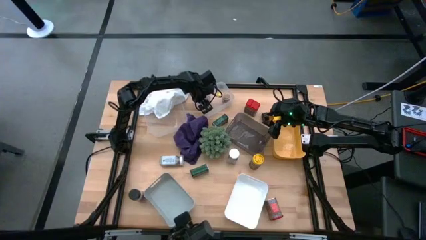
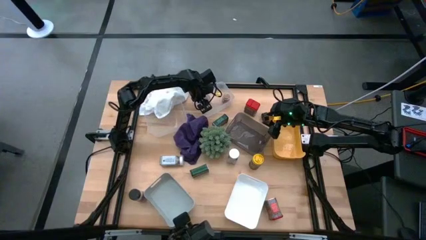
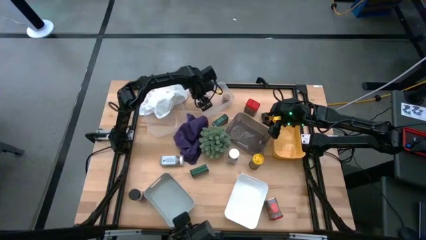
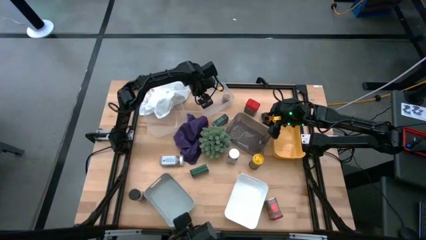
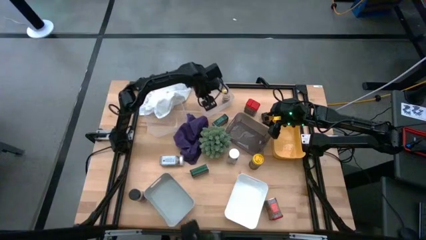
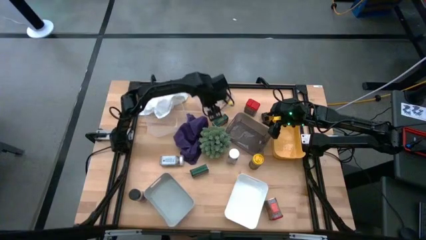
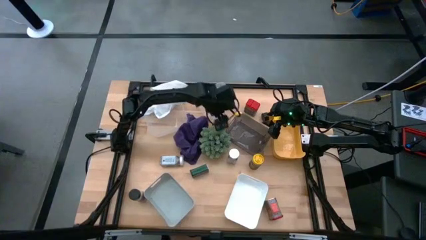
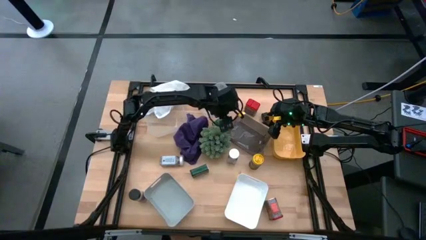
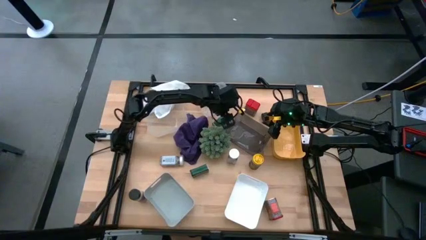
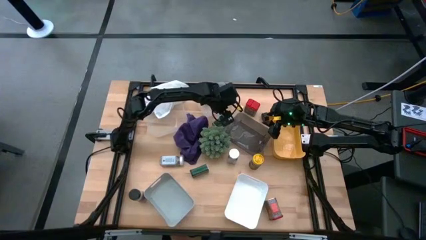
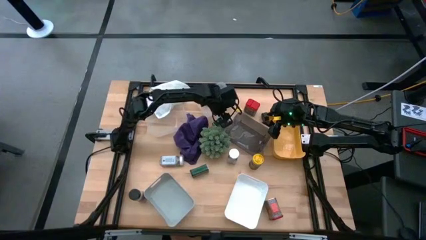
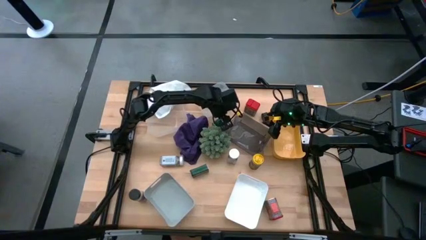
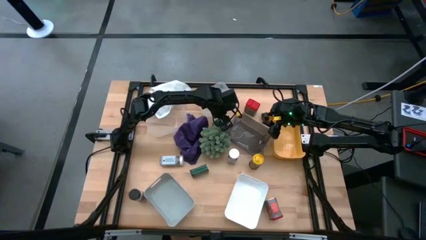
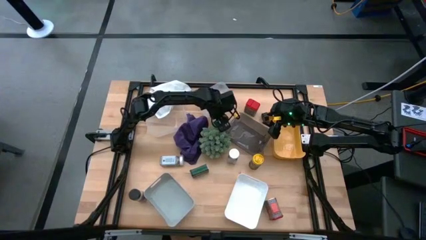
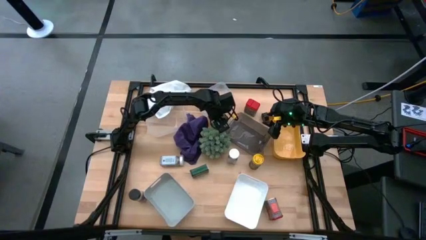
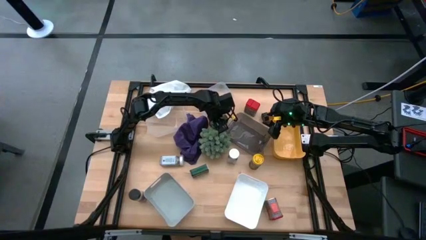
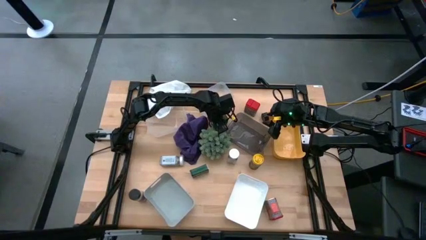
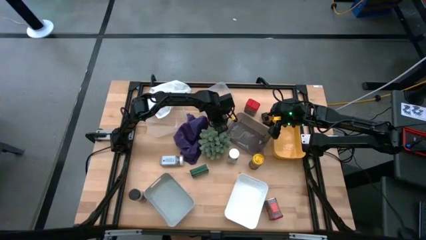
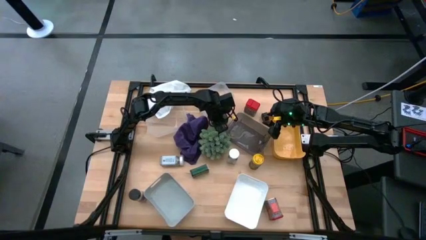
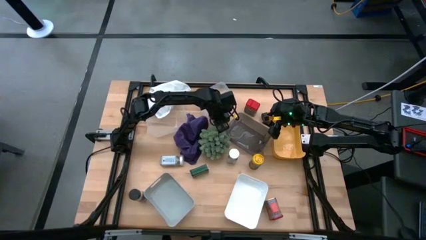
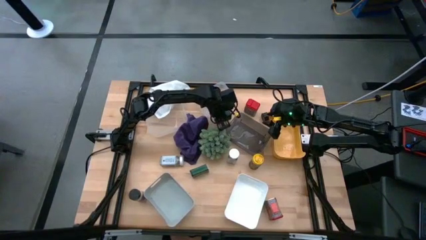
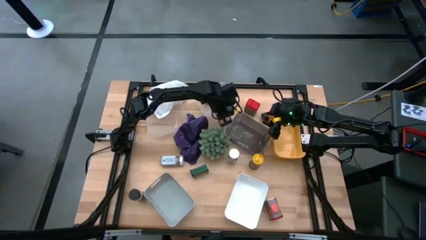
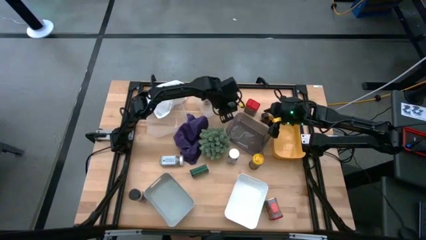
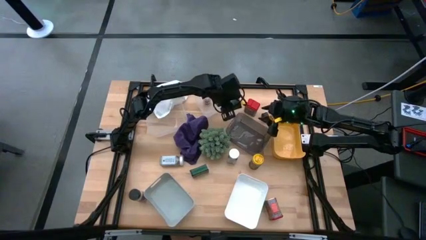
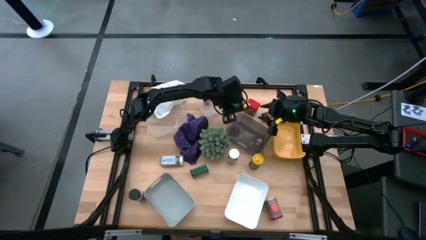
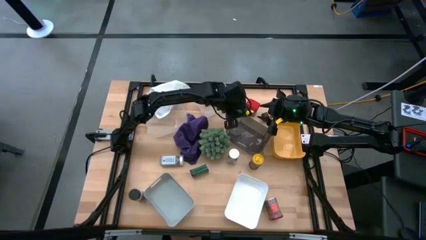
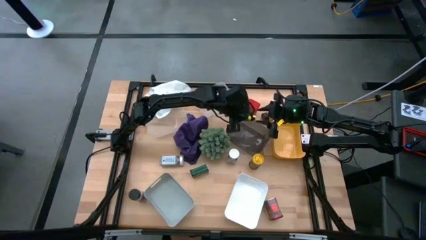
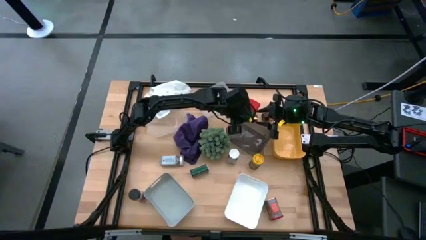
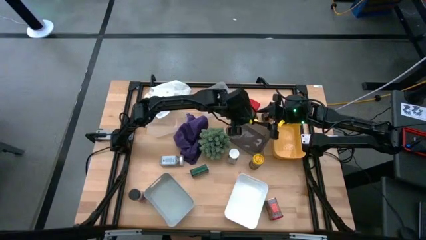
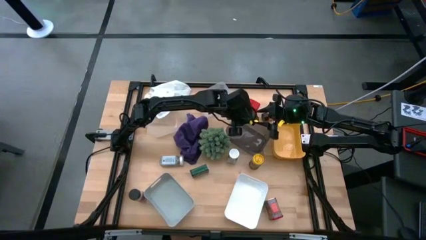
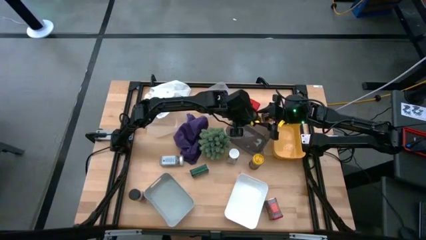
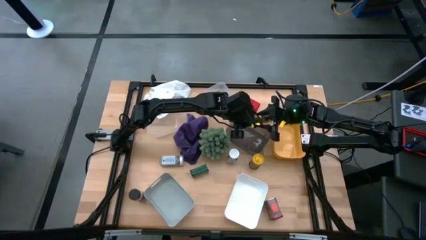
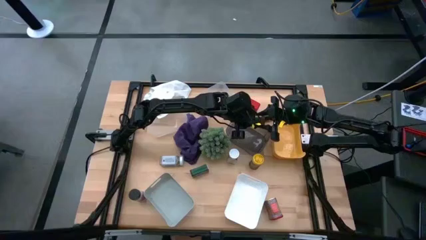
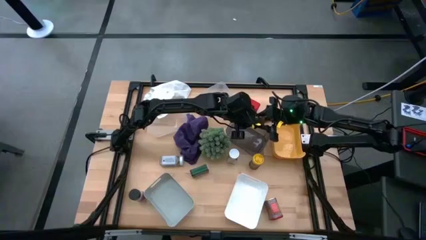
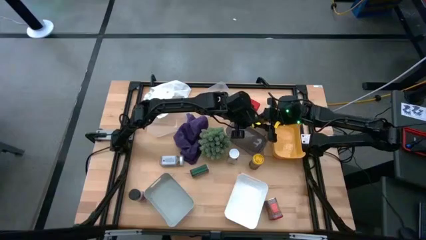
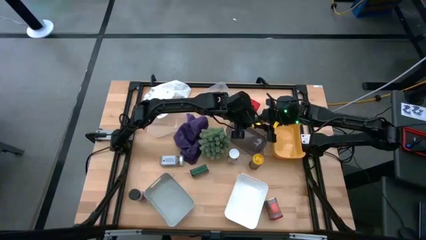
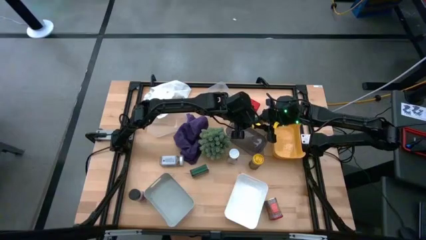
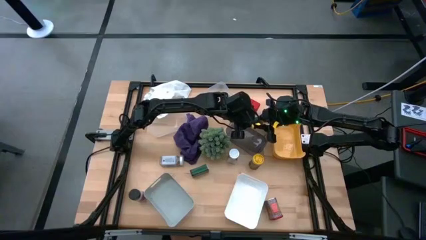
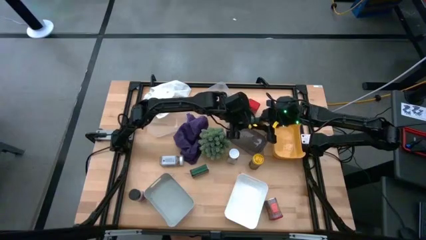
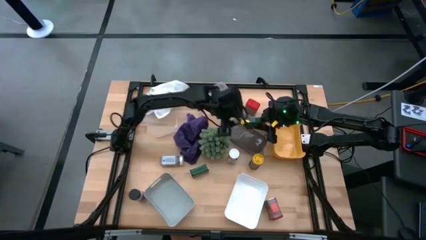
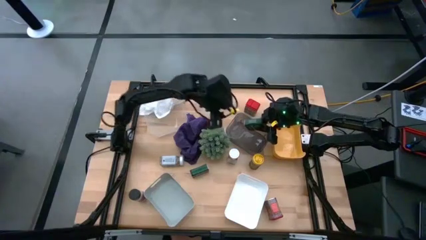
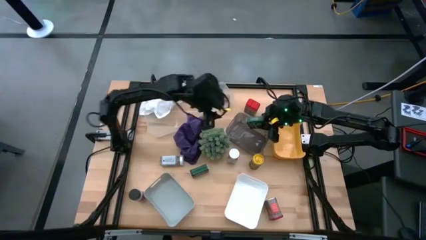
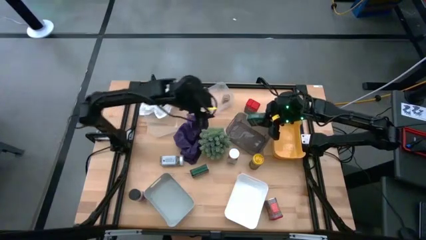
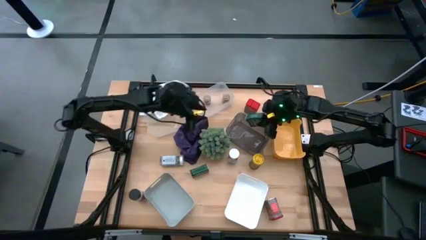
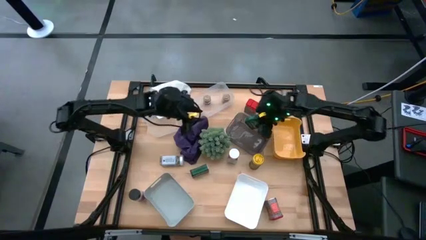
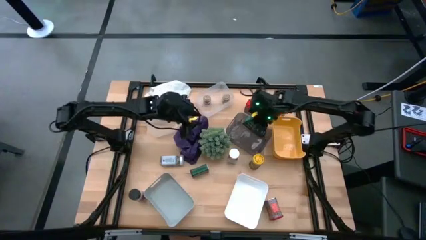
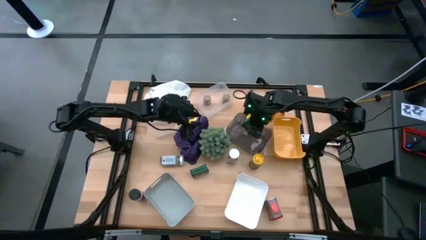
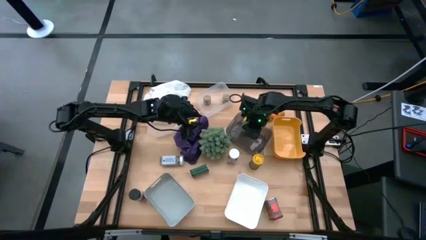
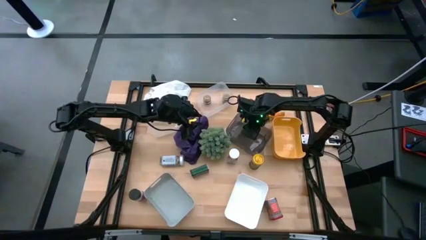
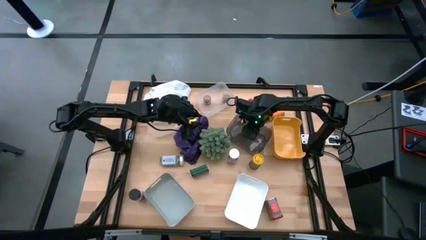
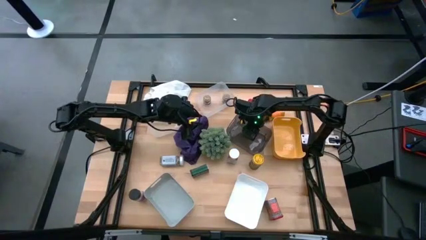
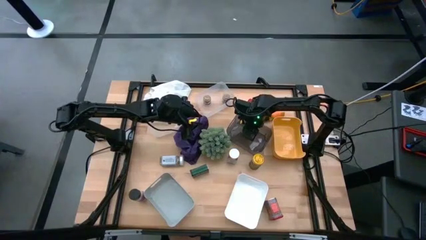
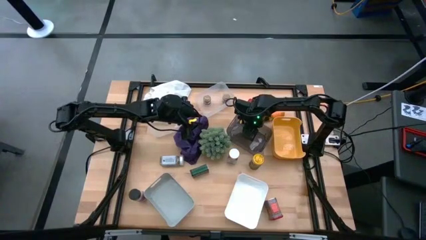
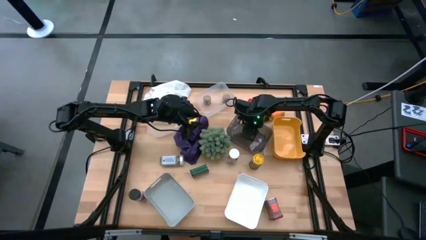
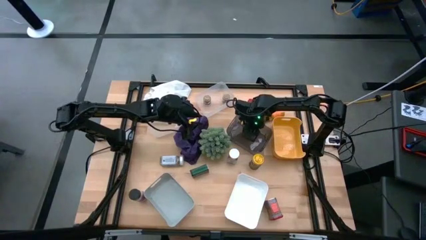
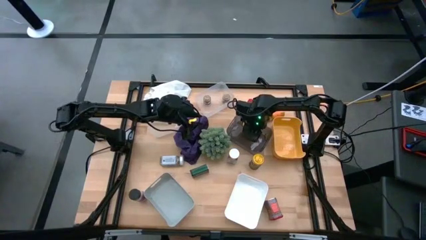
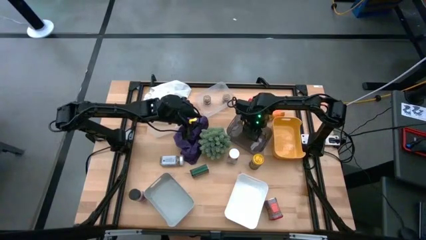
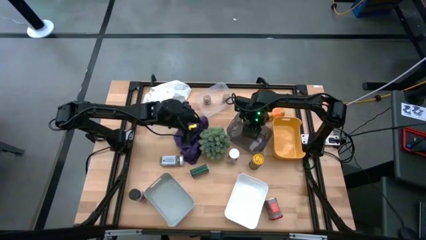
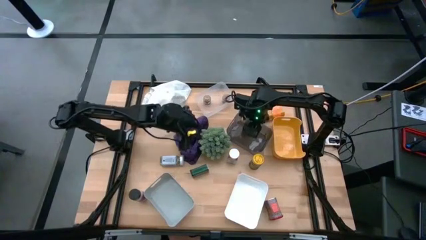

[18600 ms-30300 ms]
Task: Sort spices by type
Put the top green seasoning can into the black bin
